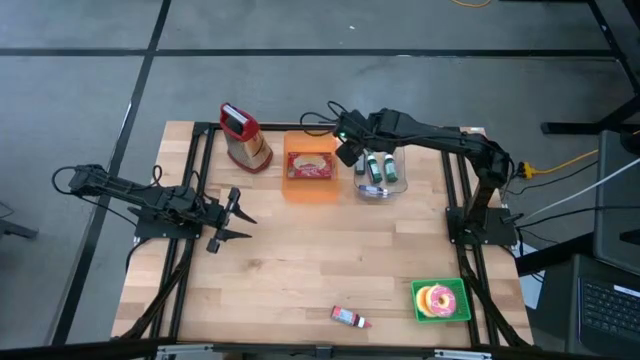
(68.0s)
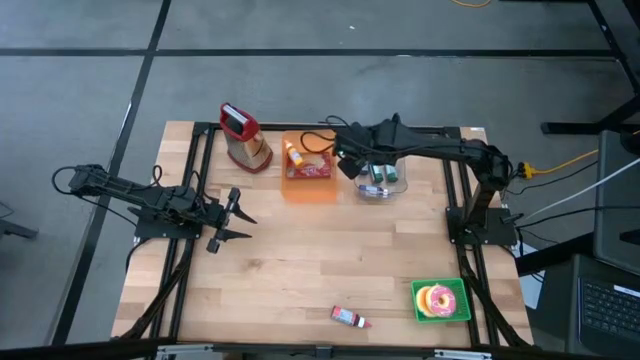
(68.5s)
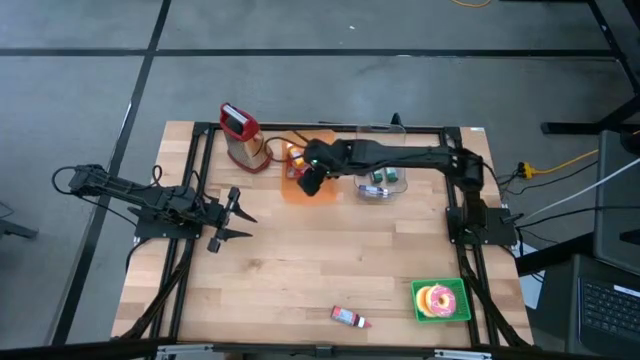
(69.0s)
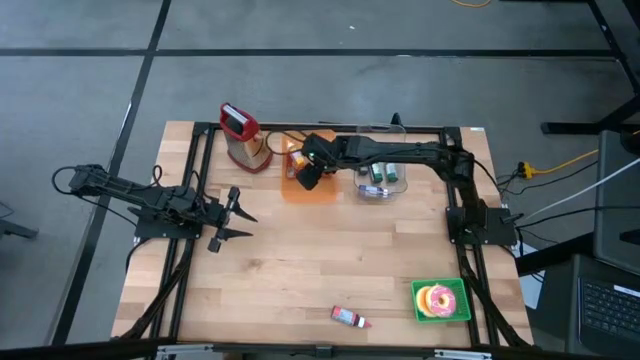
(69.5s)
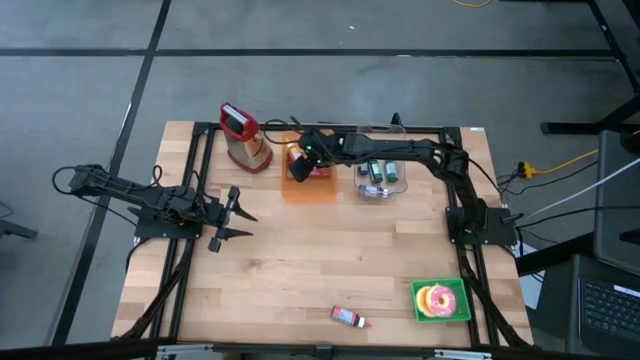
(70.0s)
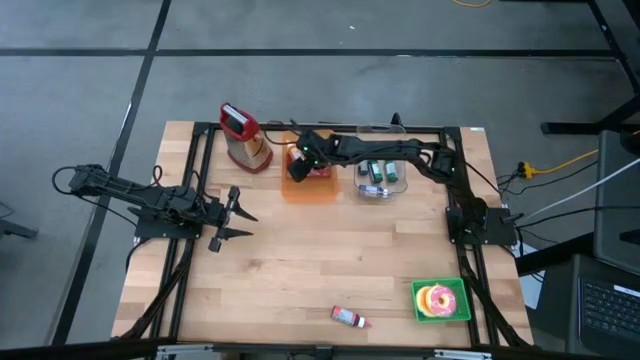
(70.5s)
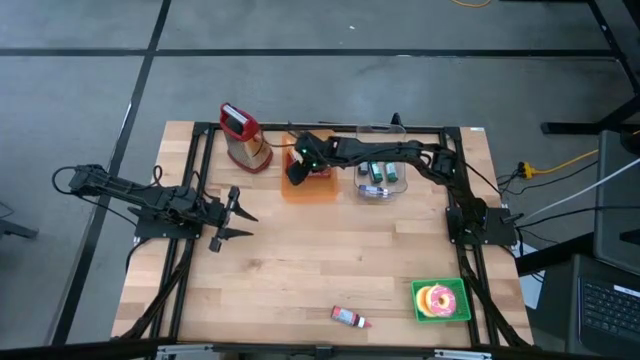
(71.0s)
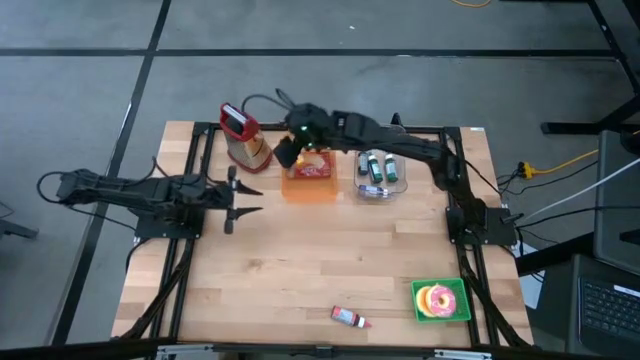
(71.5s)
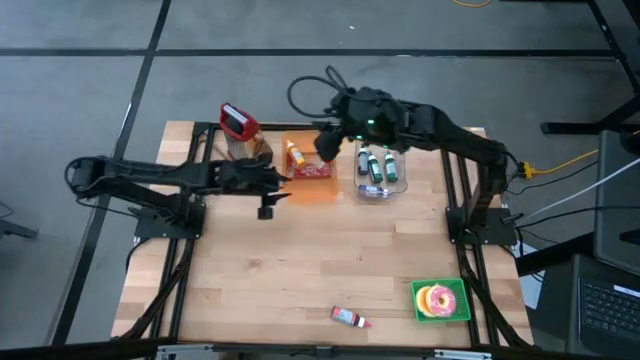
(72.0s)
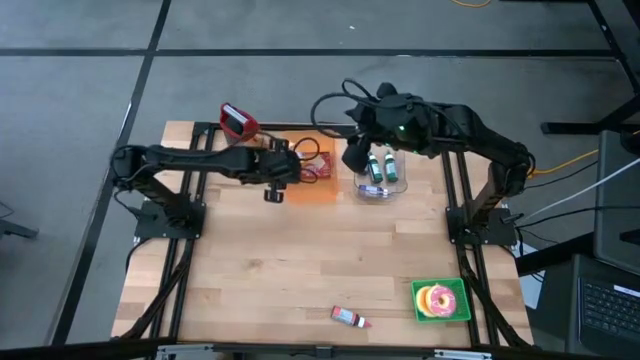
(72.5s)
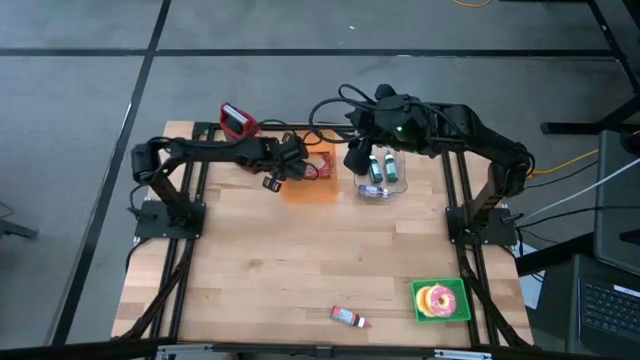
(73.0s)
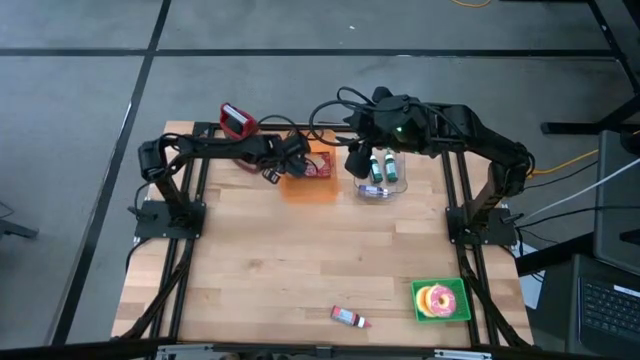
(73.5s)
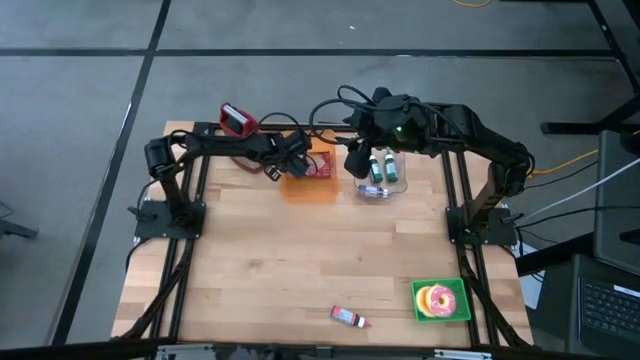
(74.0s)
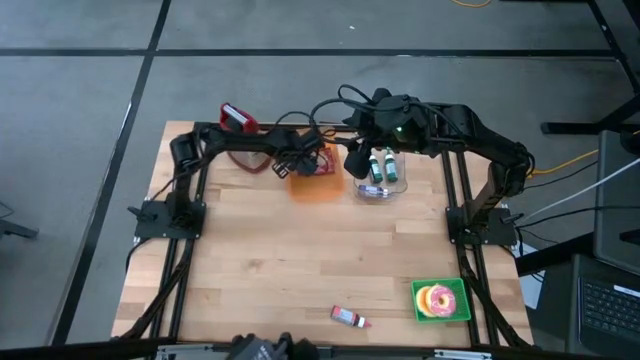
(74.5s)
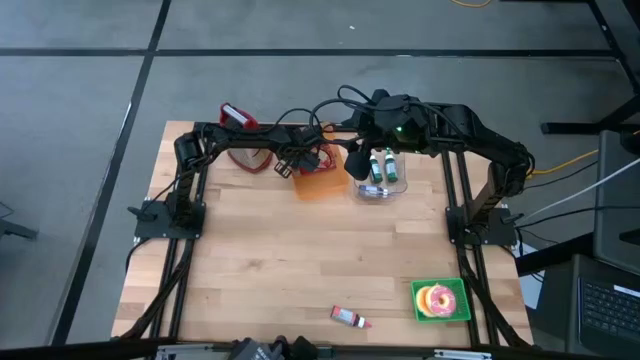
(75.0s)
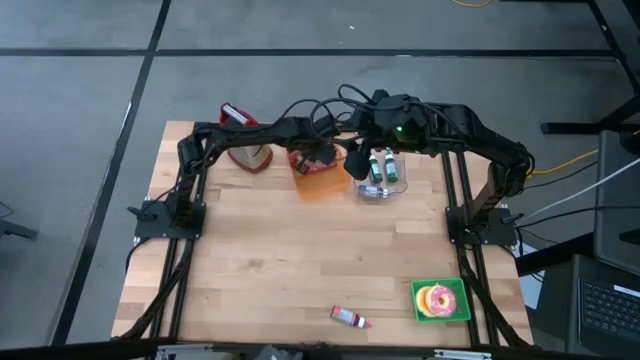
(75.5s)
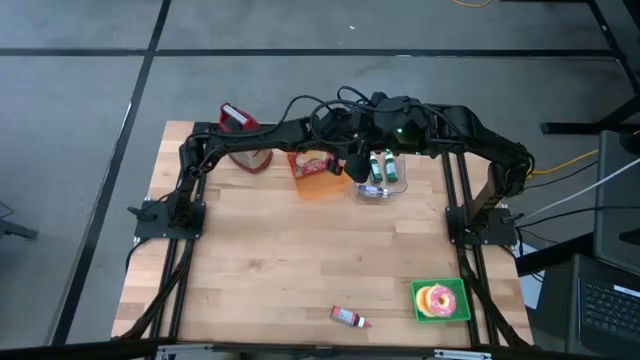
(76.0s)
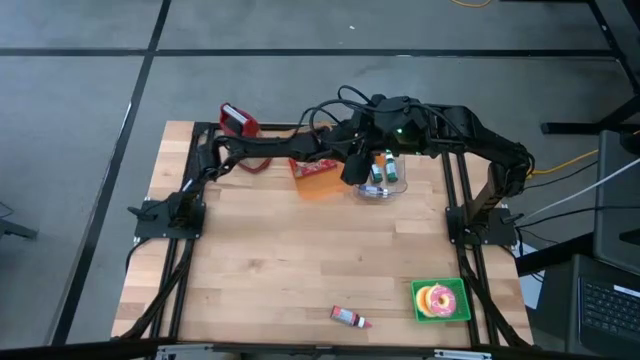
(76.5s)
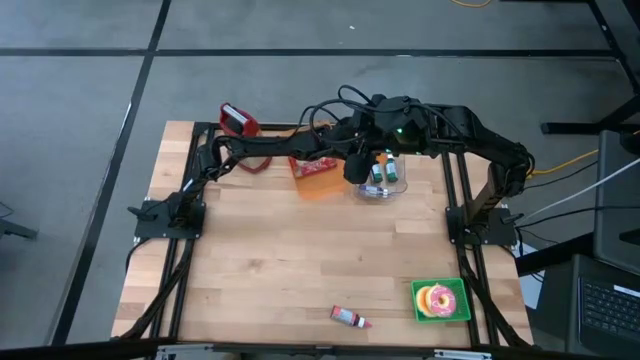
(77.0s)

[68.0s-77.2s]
Put the orange food coloring into the transparent bin

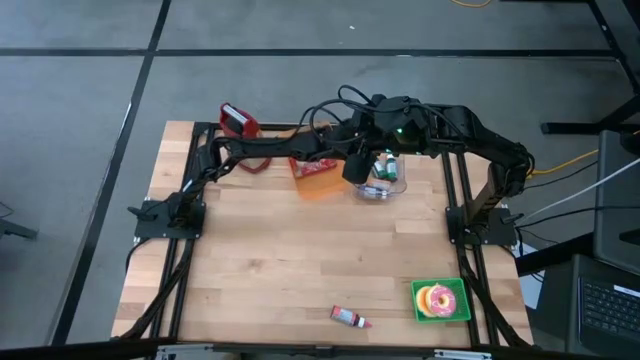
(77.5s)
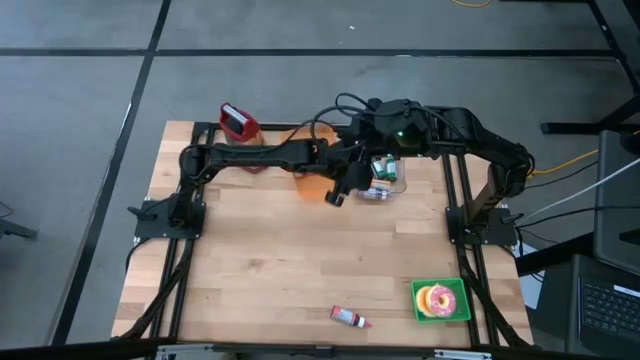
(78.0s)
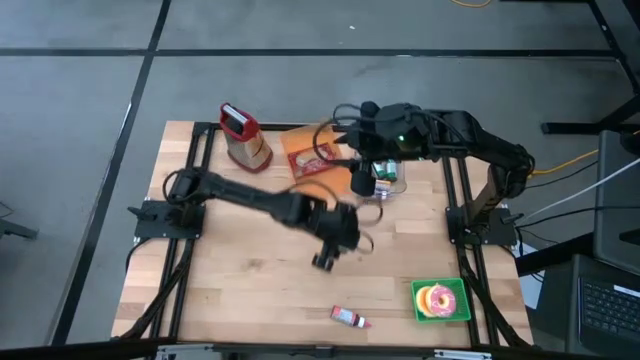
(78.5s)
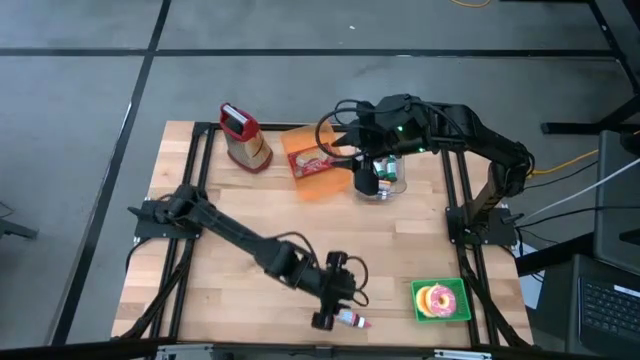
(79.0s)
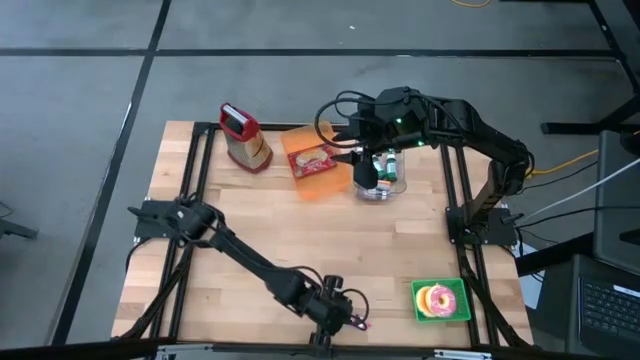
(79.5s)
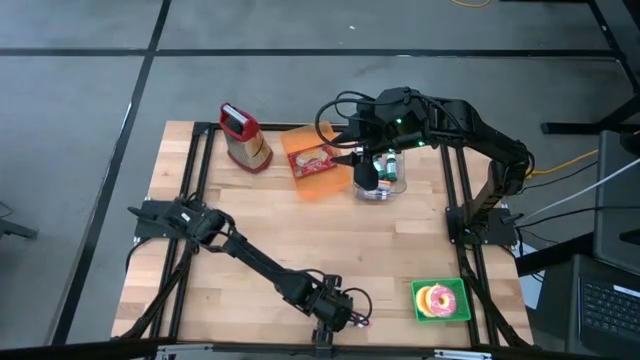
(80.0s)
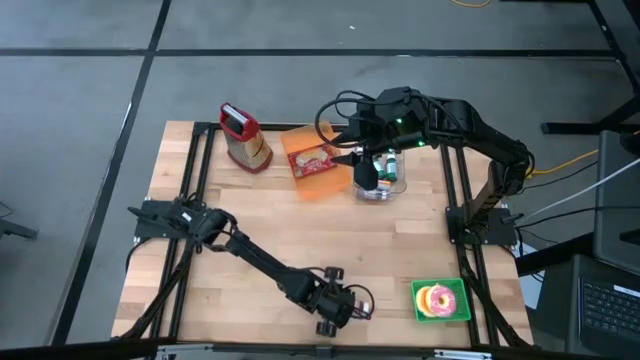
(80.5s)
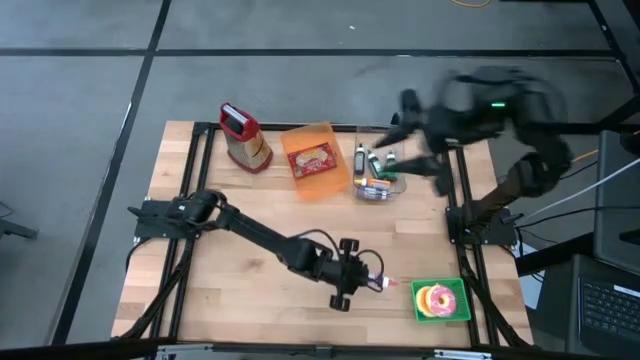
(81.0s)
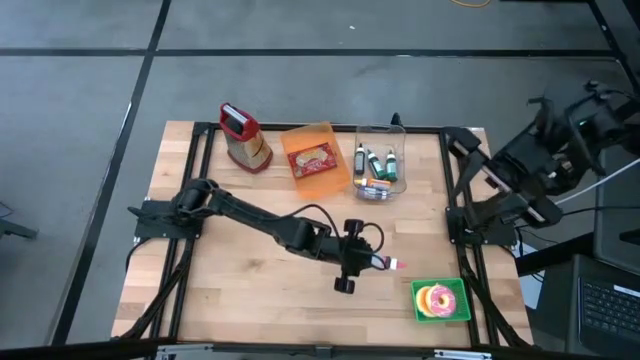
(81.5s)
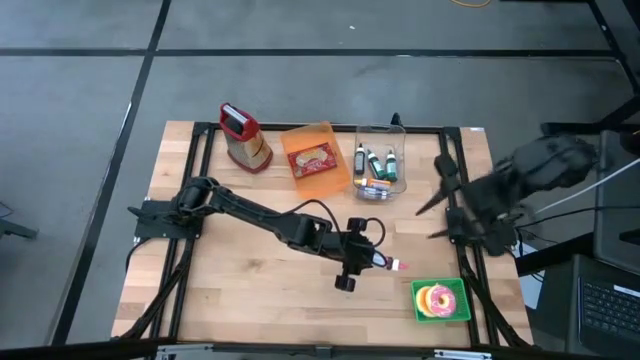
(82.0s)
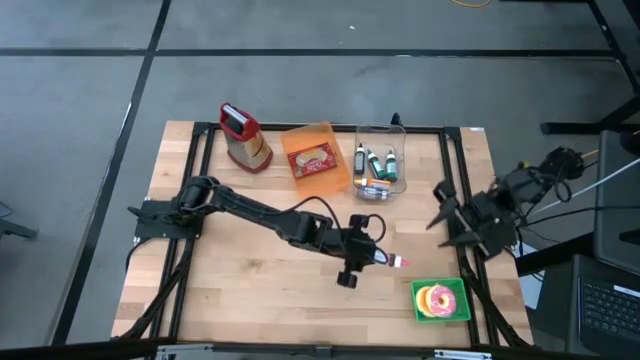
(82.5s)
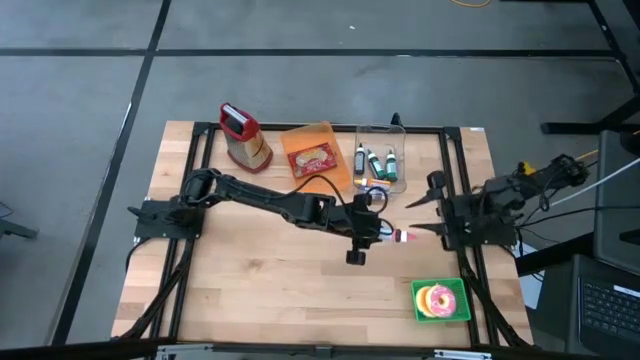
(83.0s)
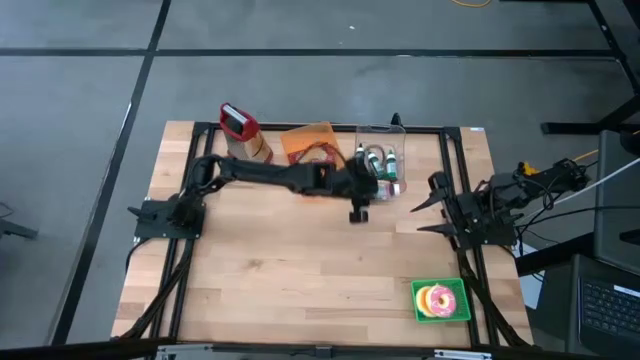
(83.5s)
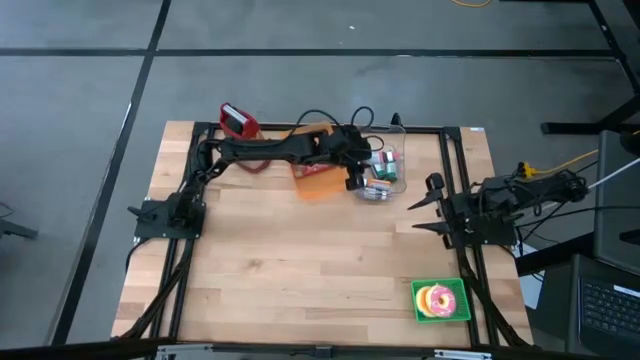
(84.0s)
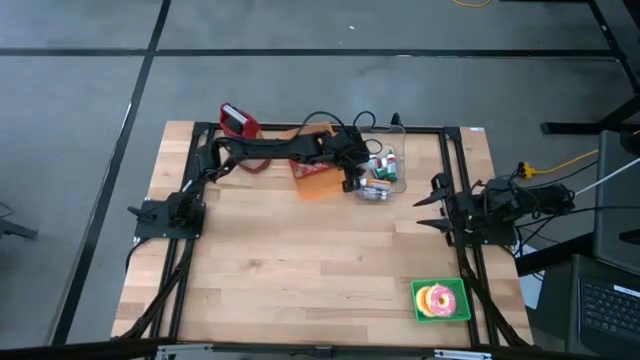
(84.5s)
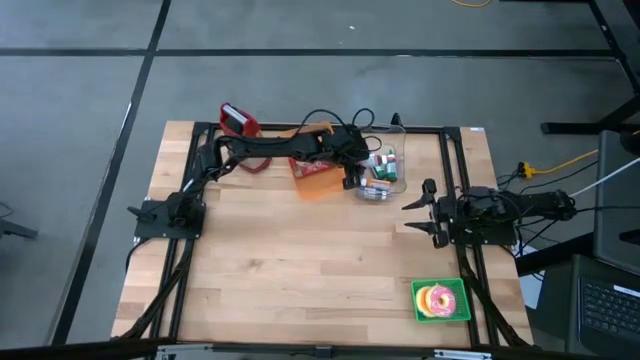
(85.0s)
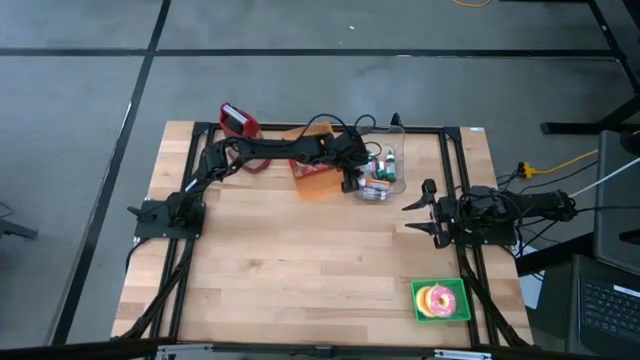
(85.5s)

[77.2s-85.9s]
Put the pink food coloring into the transparent bin
